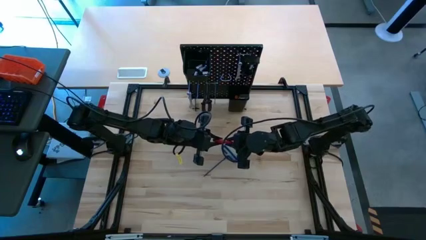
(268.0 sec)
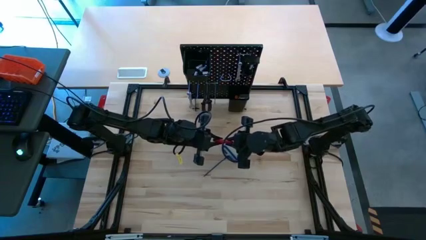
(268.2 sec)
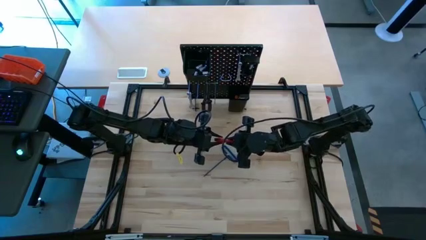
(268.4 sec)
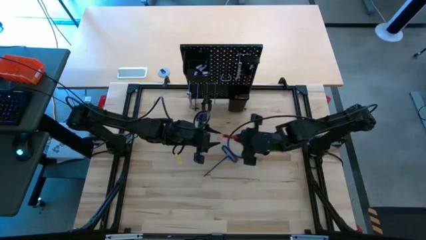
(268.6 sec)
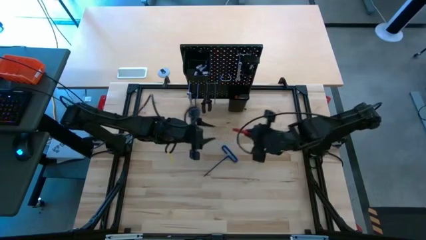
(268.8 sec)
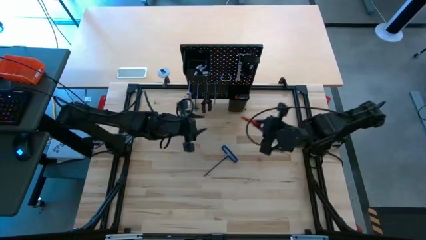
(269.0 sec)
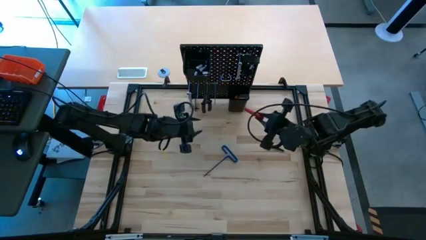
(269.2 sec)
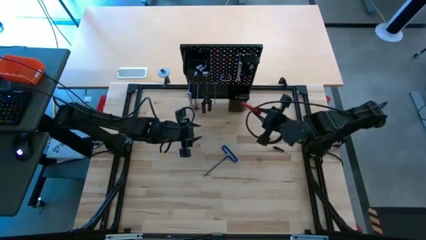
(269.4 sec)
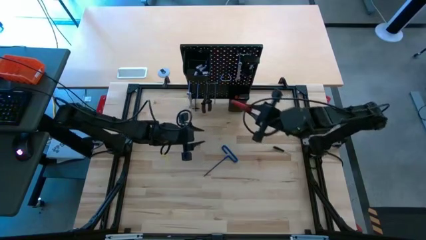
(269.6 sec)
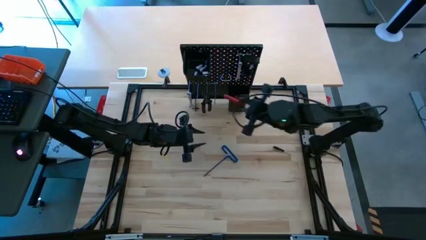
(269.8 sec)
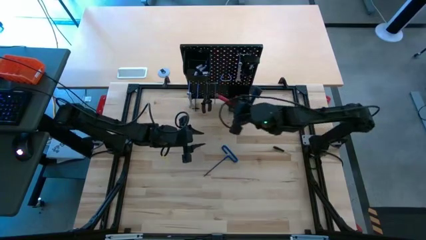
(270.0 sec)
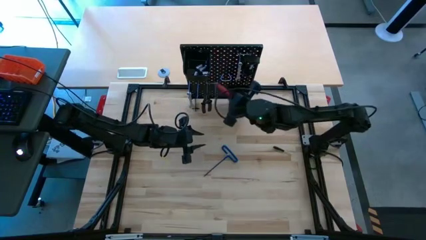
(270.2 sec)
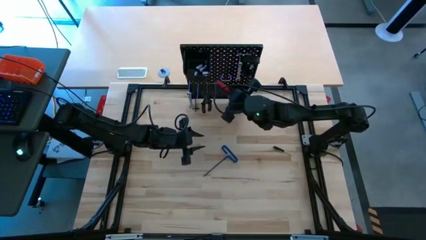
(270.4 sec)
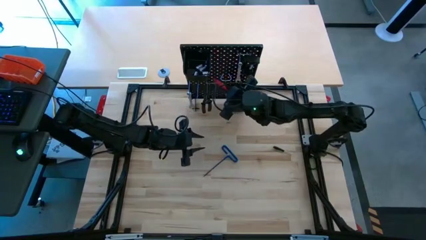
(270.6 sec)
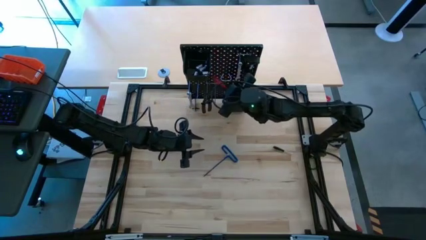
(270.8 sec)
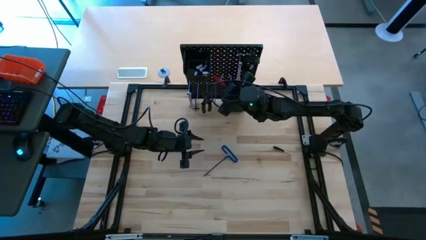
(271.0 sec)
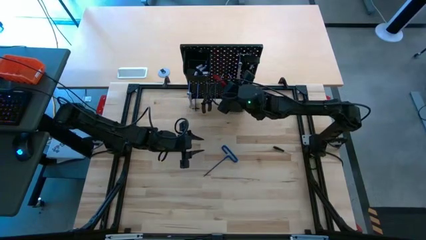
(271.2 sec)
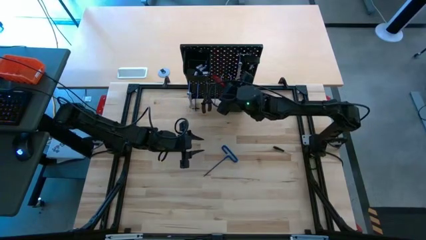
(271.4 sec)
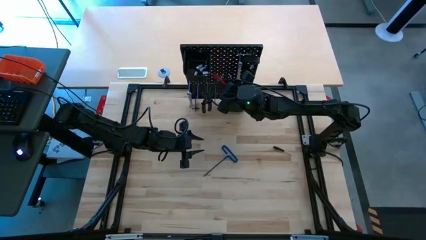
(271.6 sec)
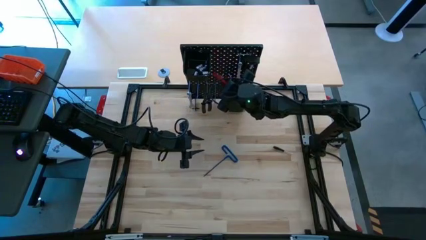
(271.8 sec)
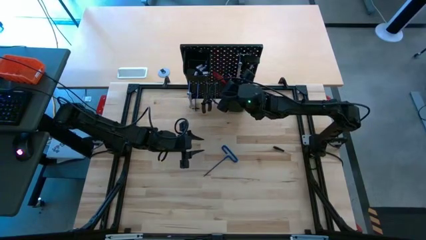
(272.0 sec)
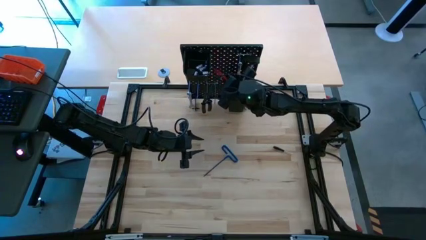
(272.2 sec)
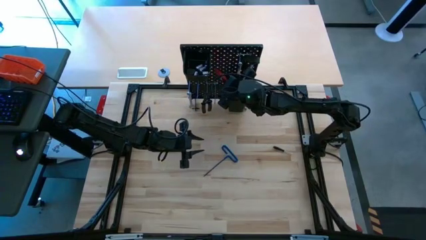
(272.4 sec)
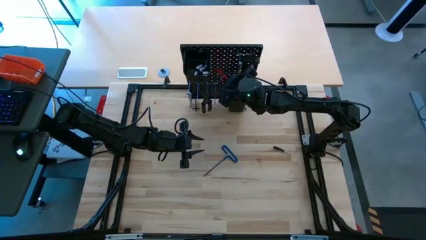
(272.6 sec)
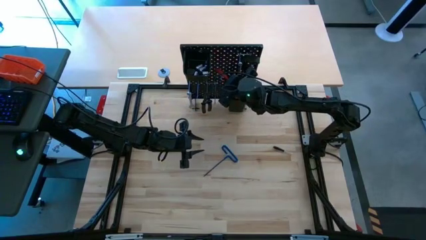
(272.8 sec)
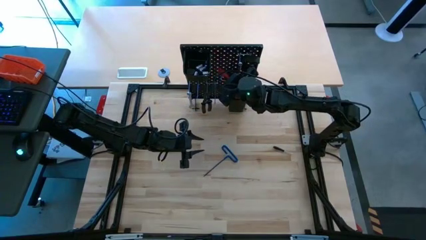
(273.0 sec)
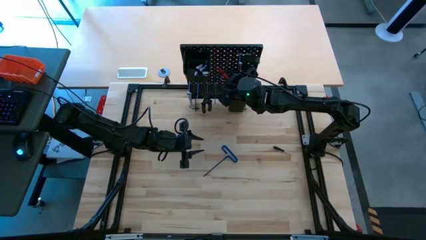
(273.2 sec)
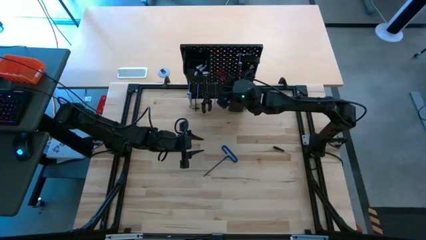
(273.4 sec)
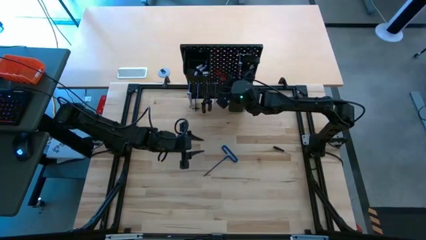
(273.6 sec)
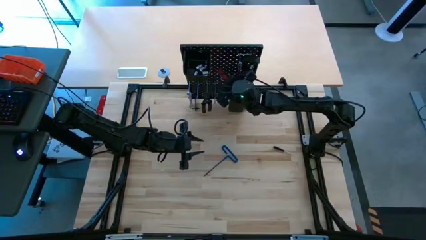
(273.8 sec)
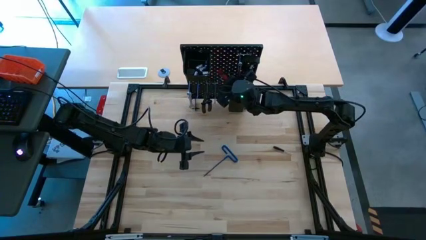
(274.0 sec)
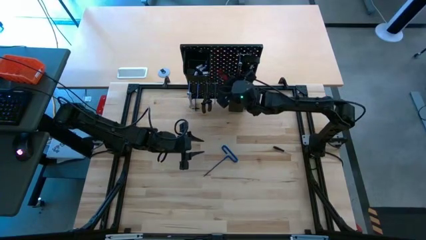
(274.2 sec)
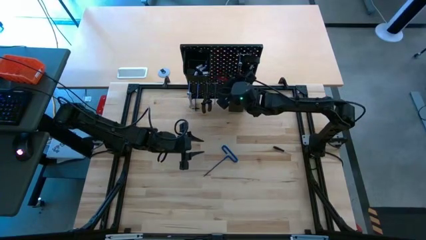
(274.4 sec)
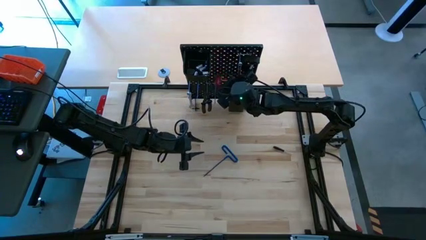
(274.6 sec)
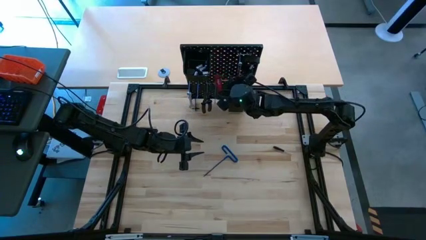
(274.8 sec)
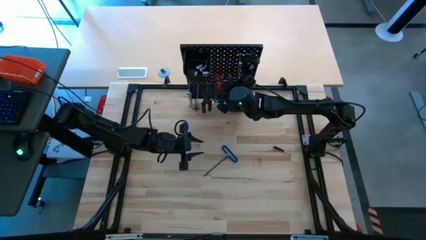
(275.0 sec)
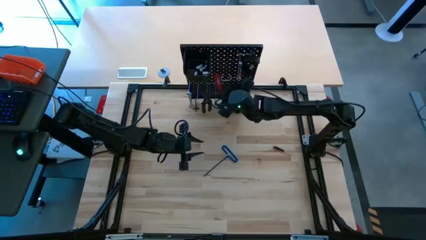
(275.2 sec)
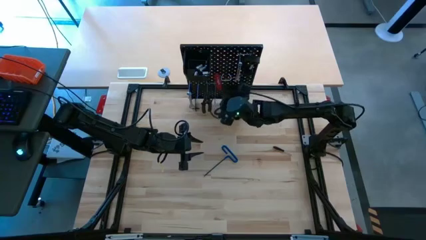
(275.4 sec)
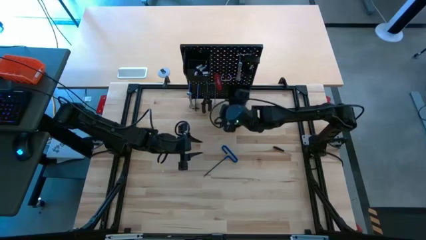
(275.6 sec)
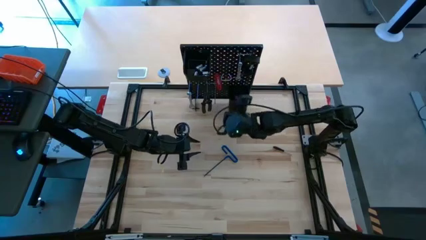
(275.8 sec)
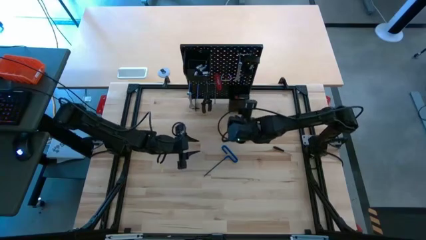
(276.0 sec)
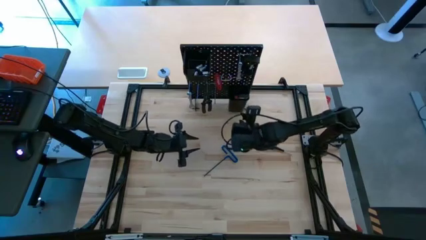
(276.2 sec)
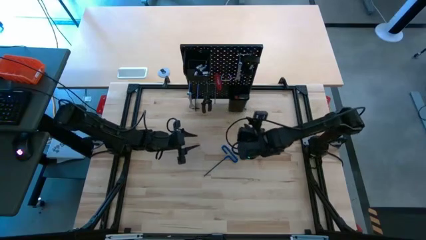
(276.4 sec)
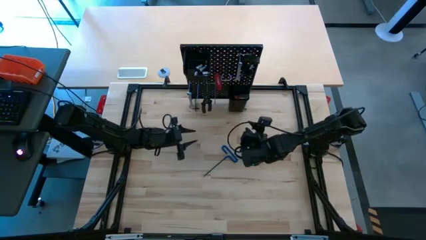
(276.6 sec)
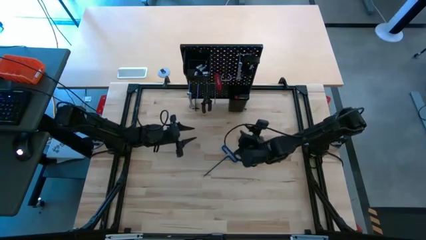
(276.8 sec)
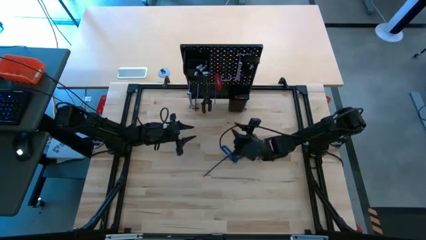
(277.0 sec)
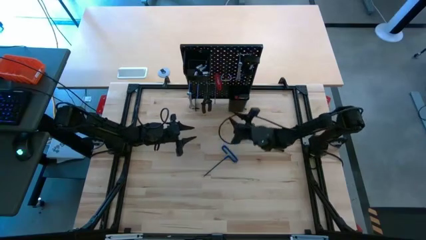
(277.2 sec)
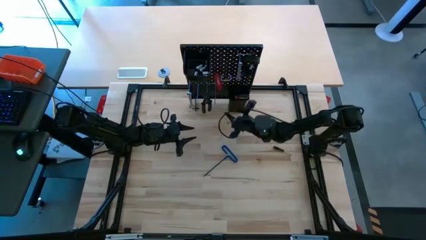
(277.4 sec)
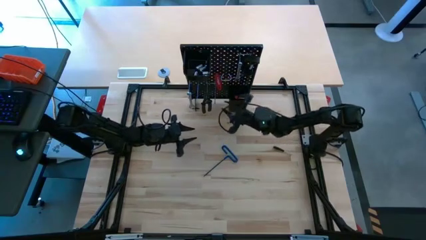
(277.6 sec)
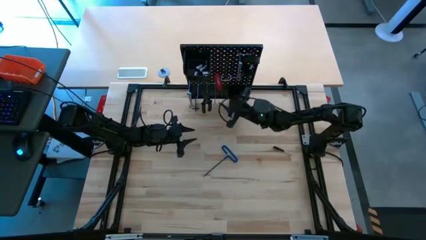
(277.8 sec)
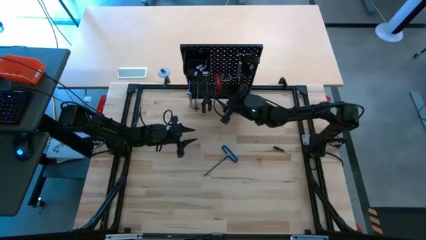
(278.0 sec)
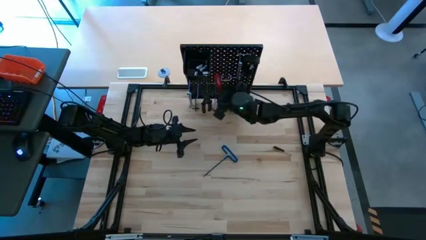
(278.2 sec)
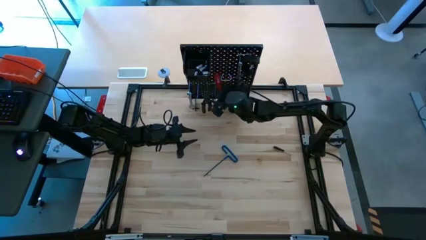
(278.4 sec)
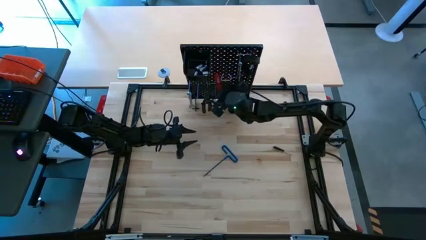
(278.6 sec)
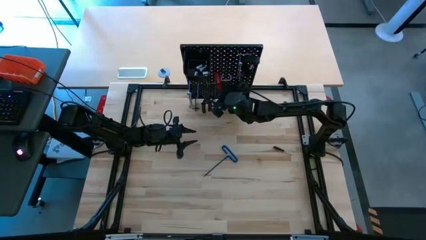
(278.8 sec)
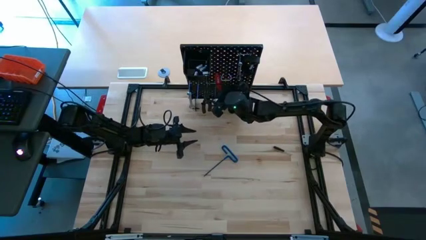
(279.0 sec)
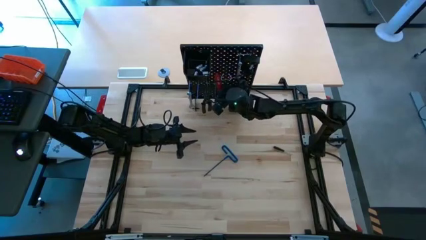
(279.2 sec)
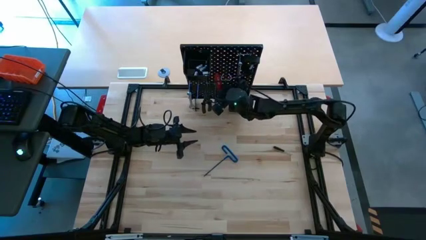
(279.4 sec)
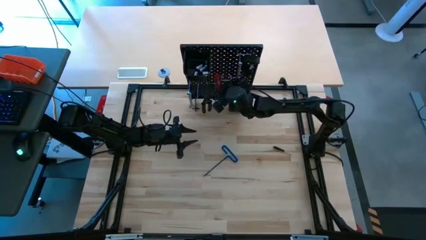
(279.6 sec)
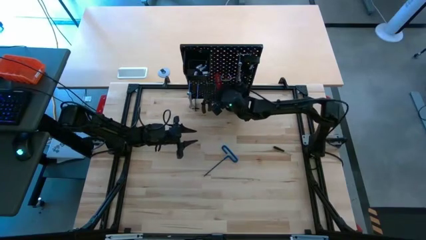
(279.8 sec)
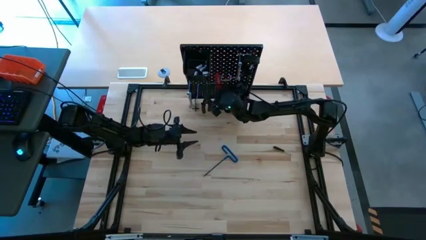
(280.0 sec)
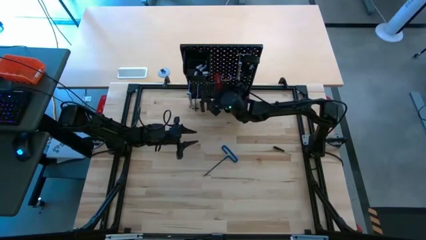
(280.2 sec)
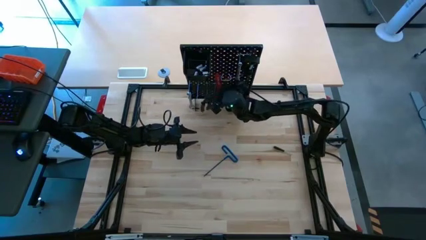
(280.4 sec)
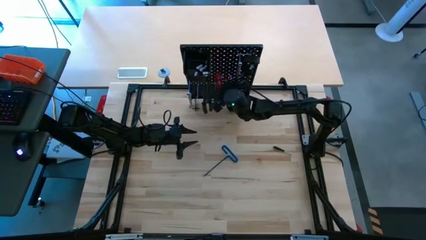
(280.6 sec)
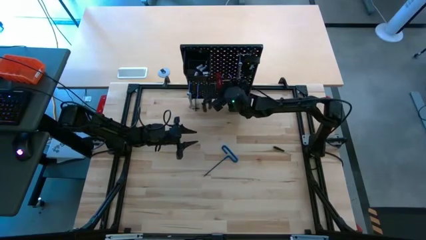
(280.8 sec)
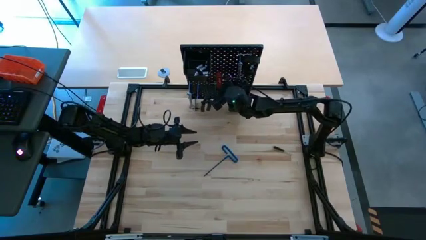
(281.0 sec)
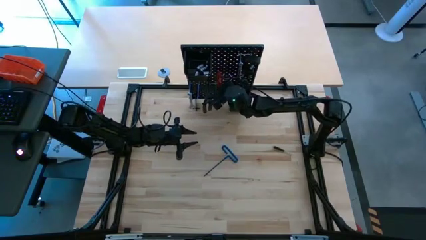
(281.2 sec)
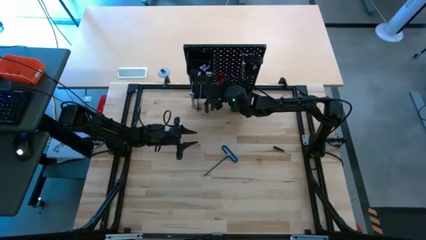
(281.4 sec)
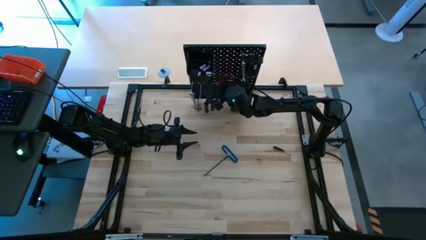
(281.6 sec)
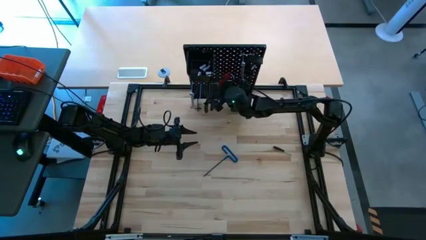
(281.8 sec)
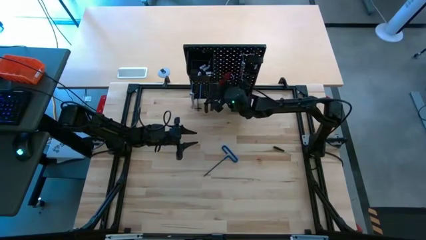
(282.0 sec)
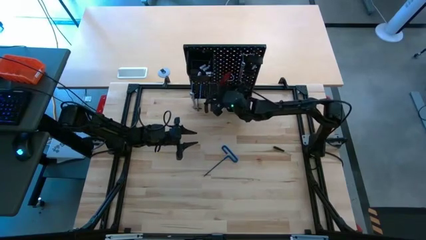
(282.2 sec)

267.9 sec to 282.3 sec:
Task: Hang tools onto peg board
Hang the allen wrench on the pegboard
